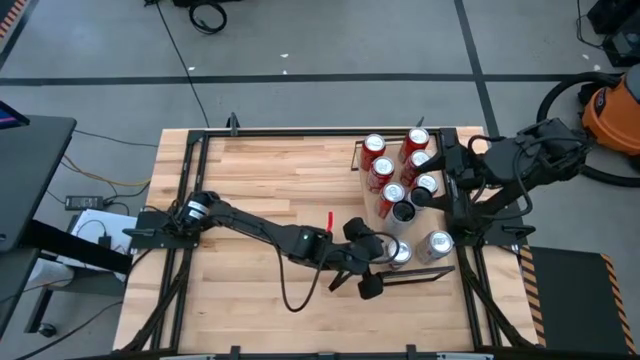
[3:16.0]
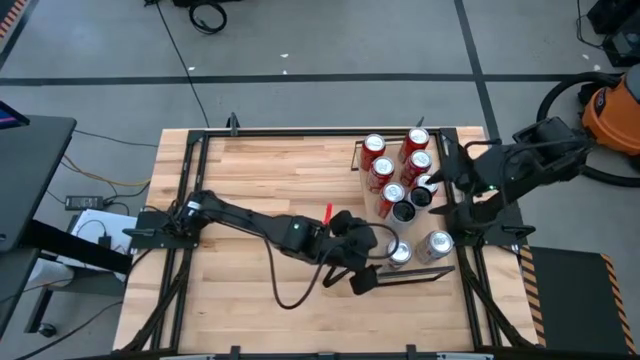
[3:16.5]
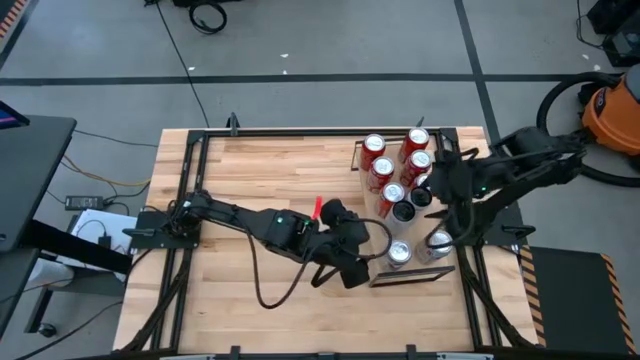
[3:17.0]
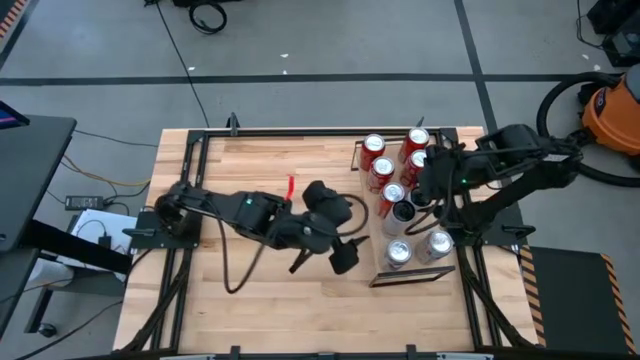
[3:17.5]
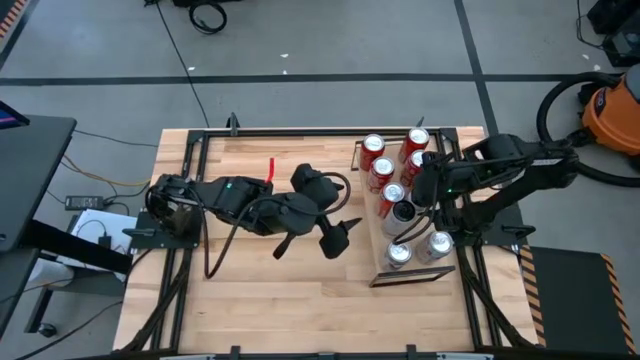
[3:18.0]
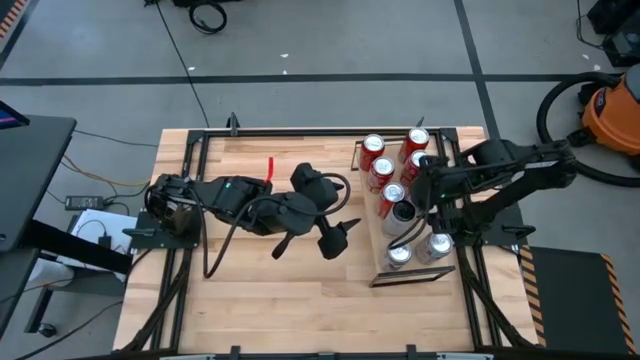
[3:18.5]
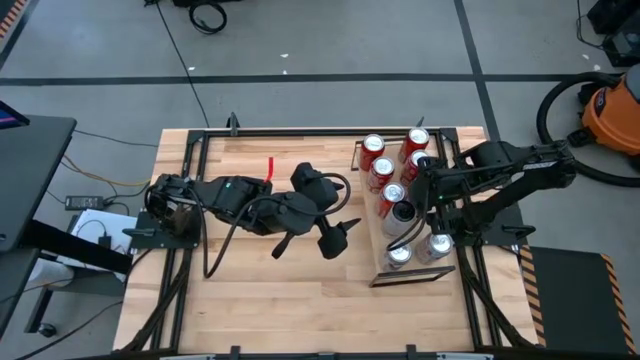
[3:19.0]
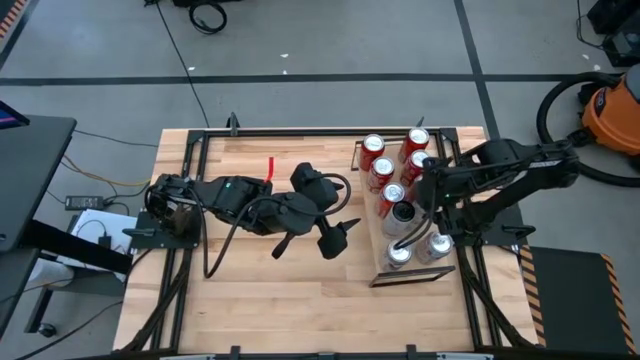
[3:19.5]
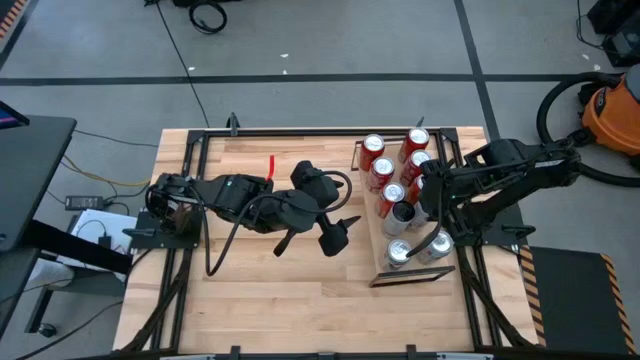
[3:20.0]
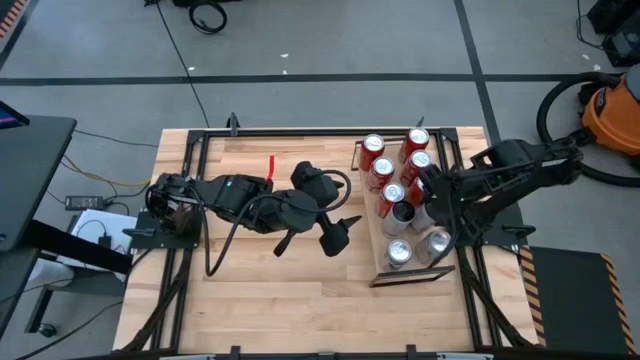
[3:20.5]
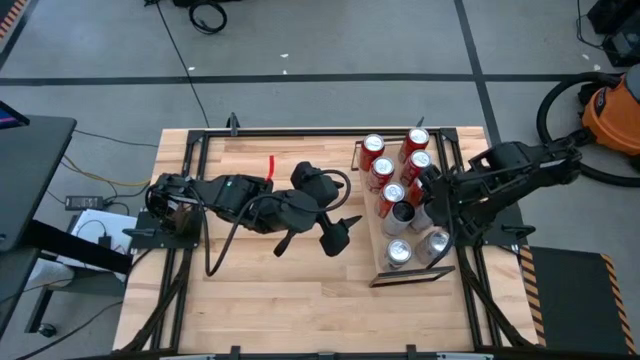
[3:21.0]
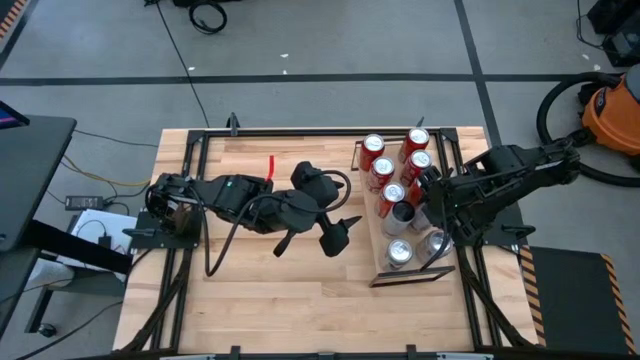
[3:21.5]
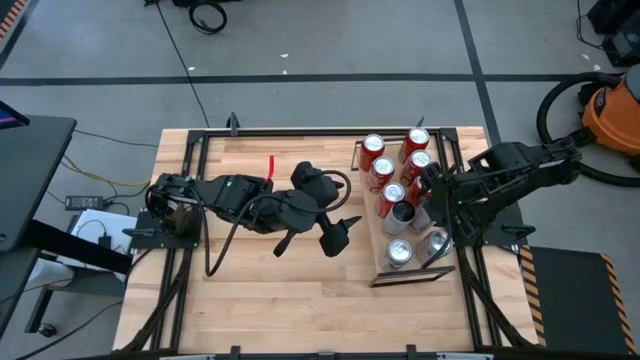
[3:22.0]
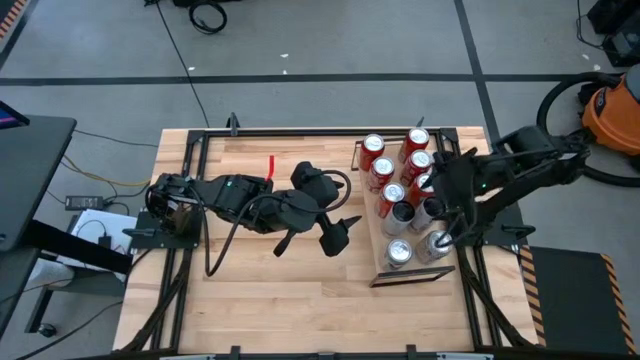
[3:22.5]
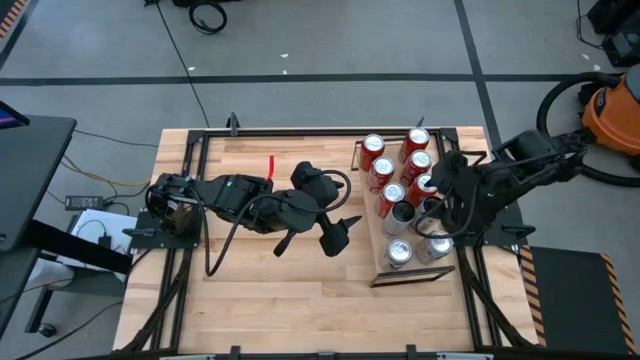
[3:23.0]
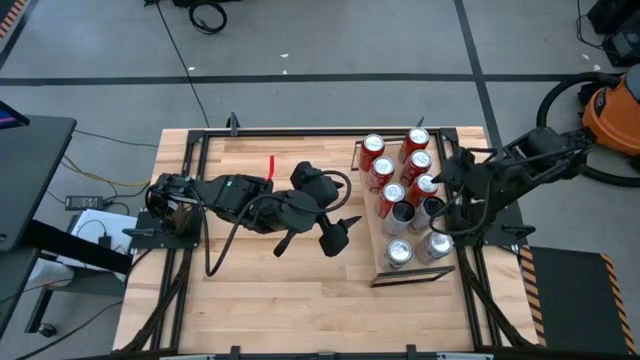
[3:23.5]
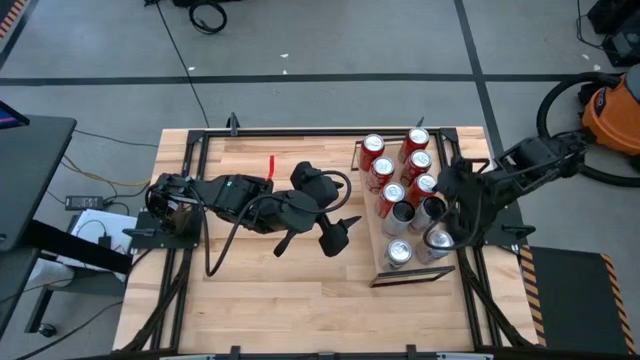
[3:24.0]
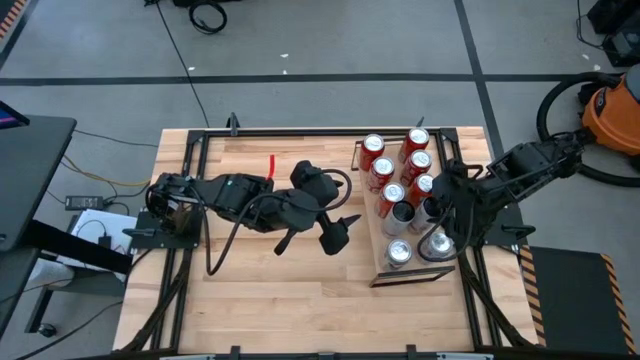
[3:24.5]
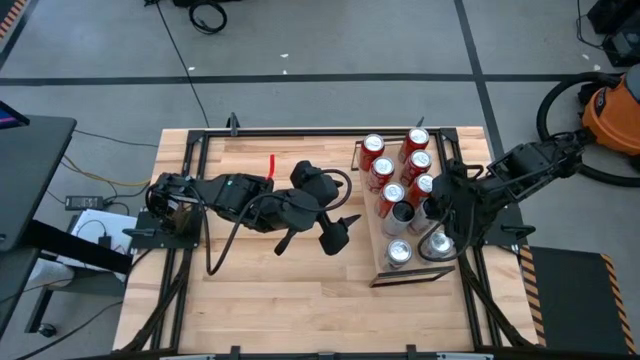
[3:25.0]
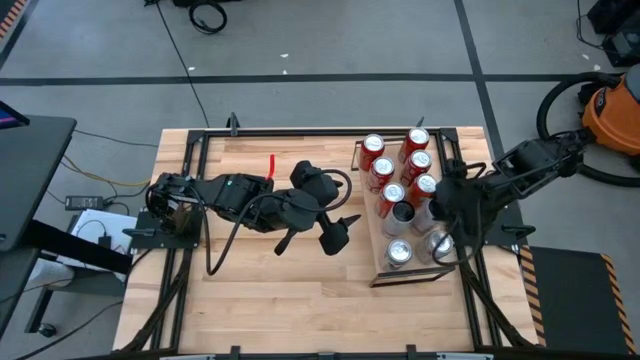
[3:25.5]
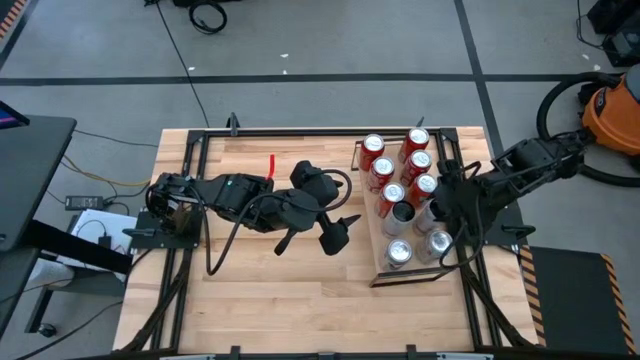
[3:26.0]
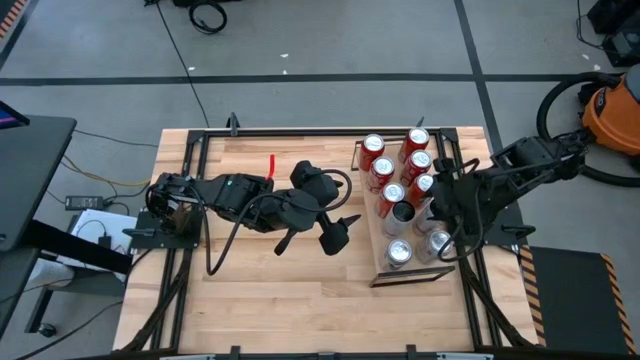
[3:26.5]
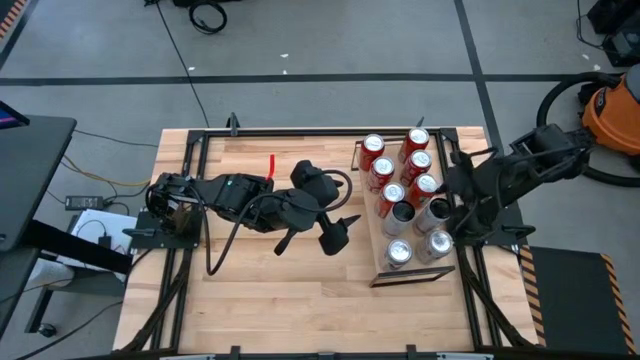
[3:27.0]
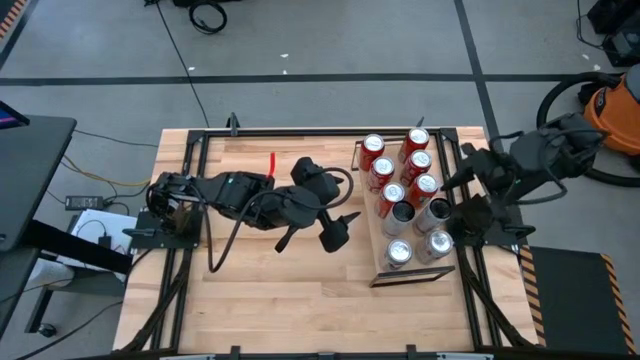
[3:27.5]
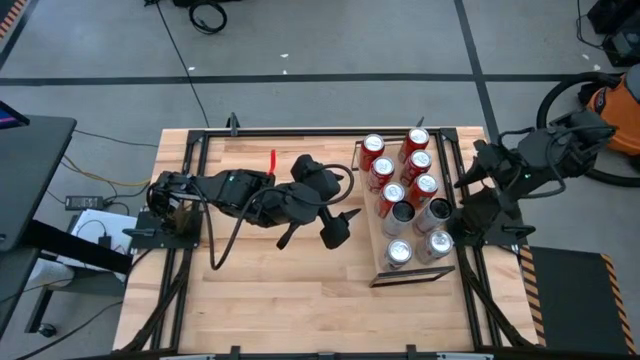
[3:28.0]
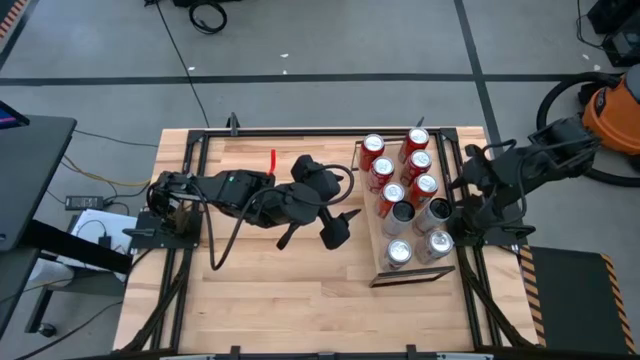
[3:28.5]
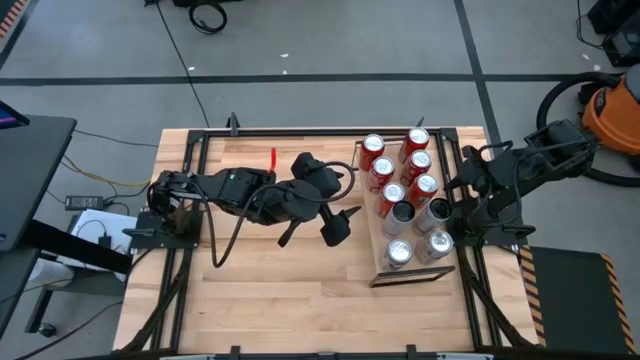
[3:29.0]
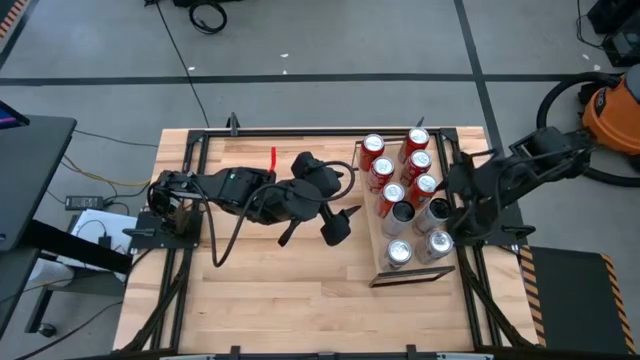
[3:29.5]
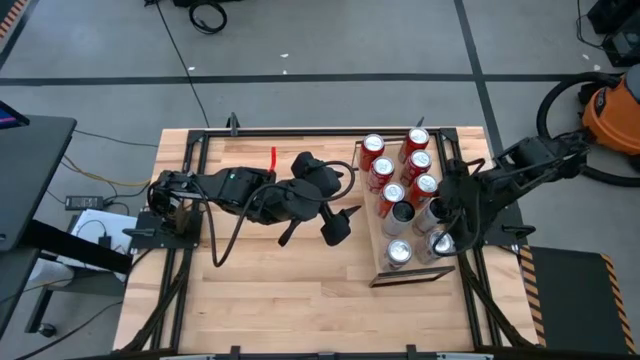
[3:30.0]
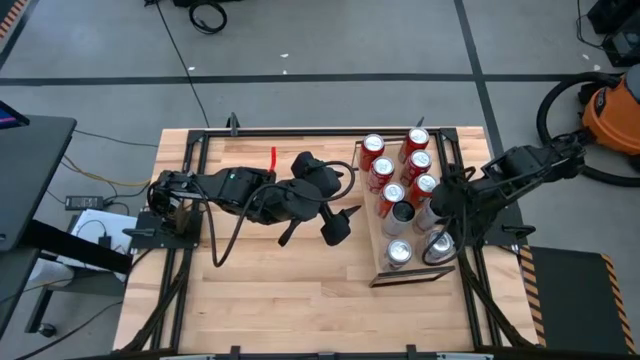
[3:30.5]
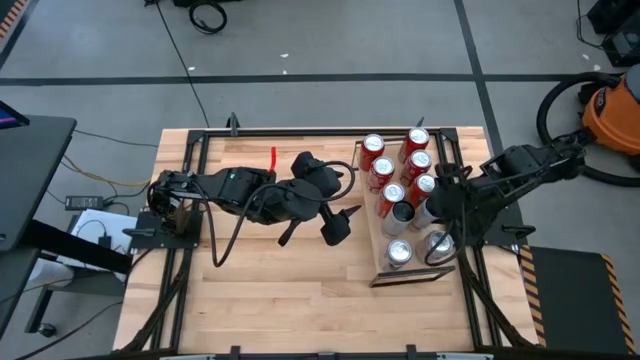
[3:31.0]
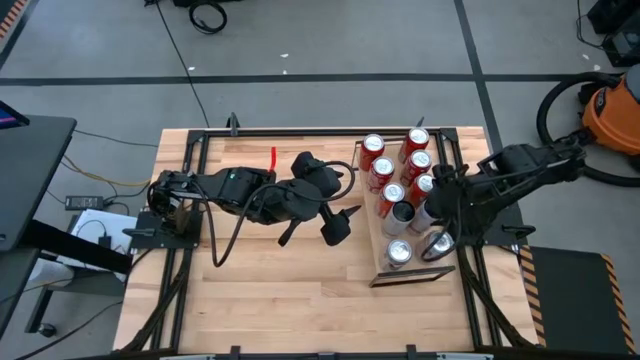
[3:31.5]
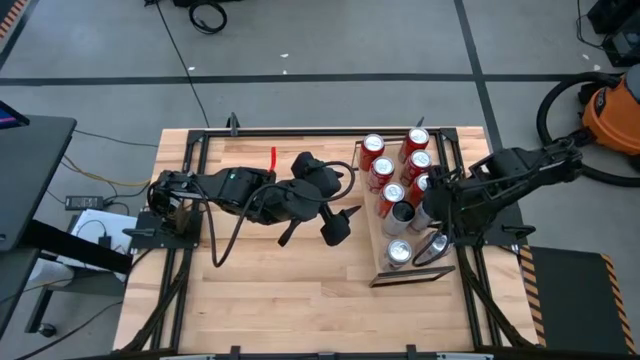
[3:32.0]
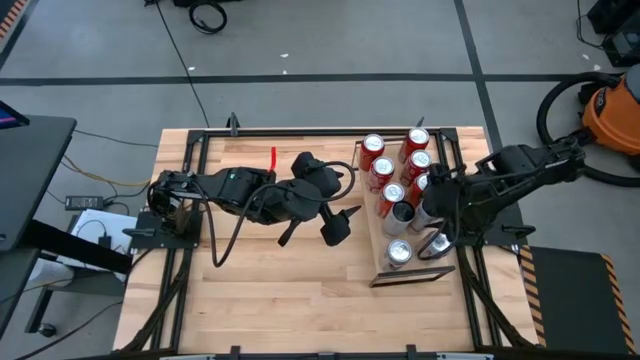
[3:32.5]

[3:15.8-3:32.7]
Task: Place canned beverage on shelf
Adjust the white pink soda can on the shelf

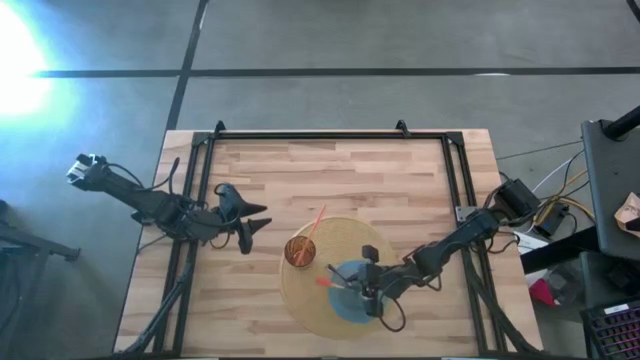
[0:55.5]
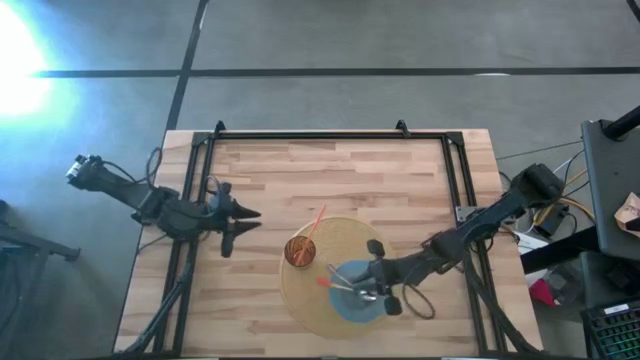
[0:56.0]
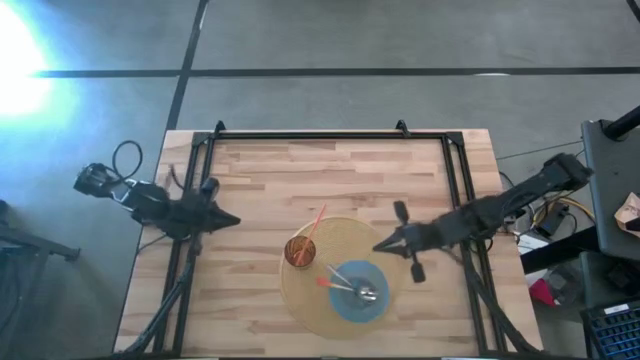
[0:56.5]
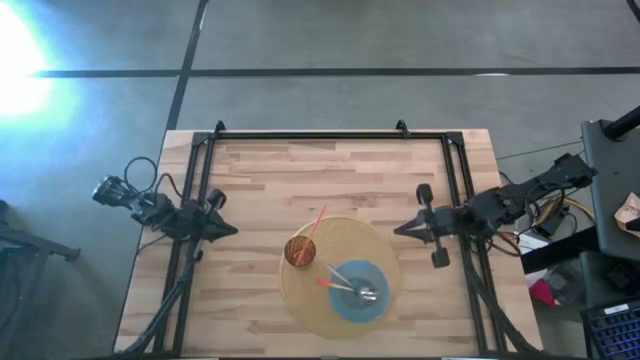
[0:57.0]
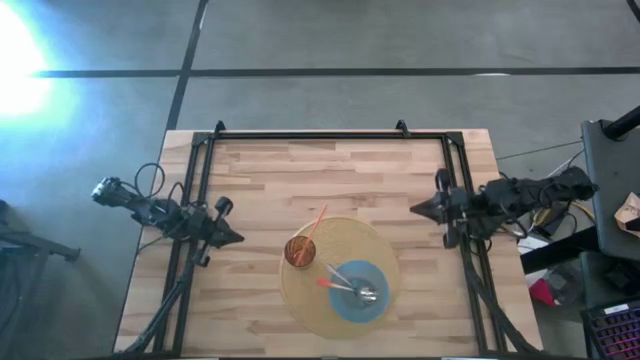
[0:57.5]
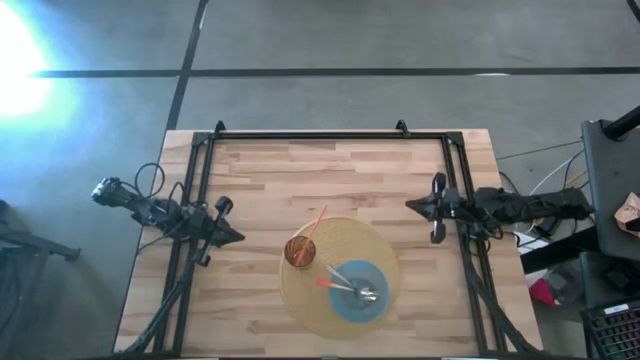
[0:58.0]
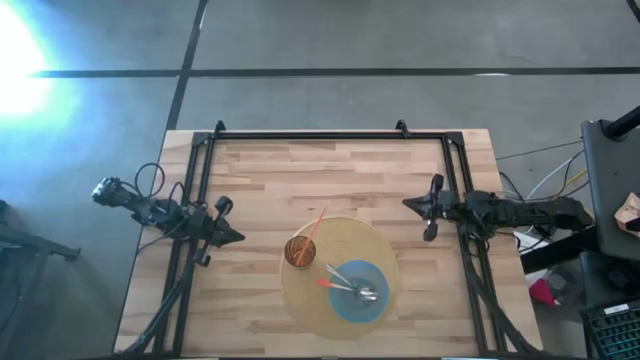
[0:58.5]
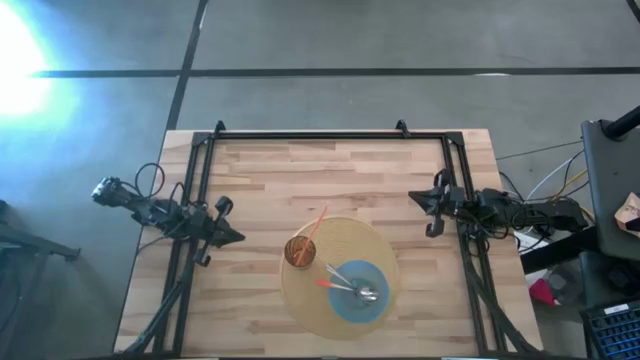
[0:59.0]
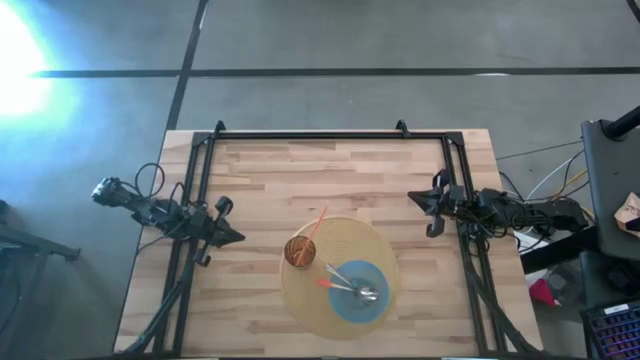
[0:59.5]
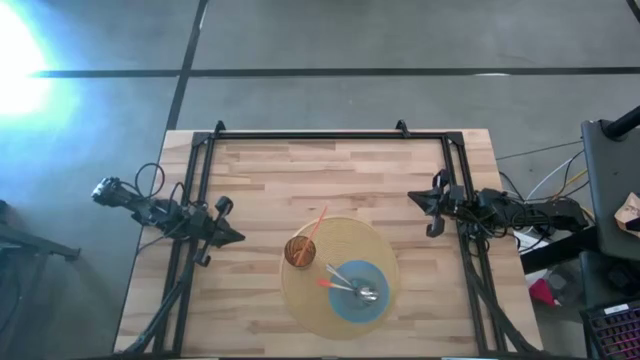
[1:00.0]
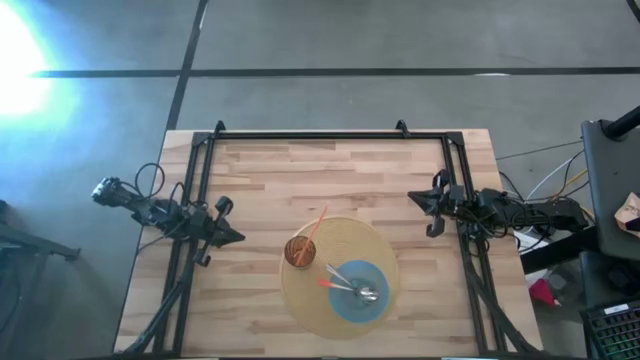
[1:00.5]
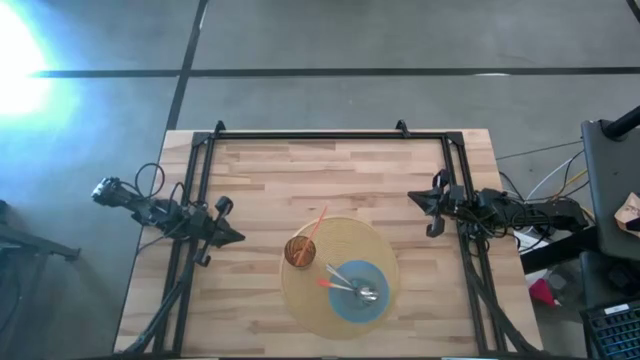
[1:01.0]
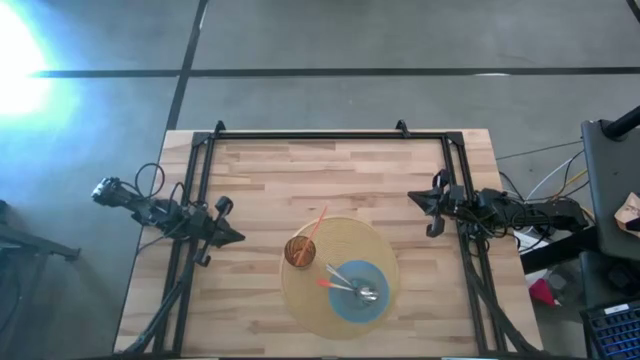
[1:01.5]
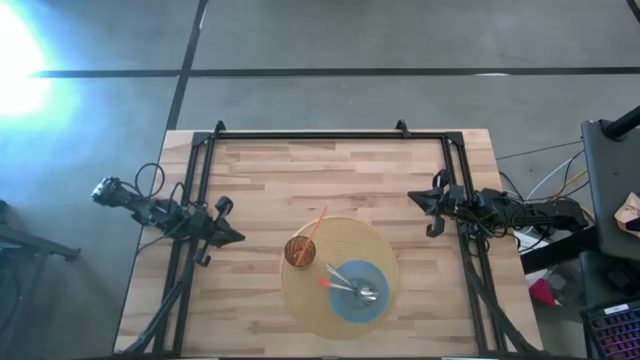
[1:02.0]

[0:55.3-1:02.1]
Task: Pick & Place Utensil
Return to Home Position
